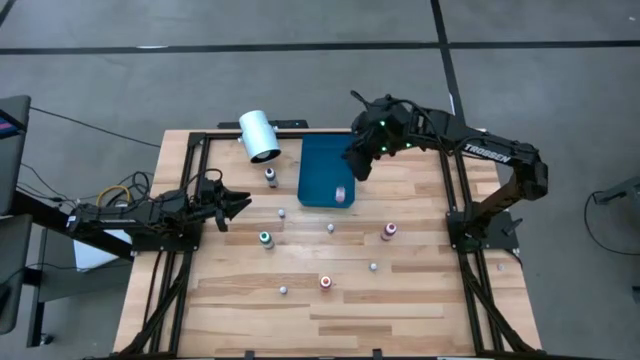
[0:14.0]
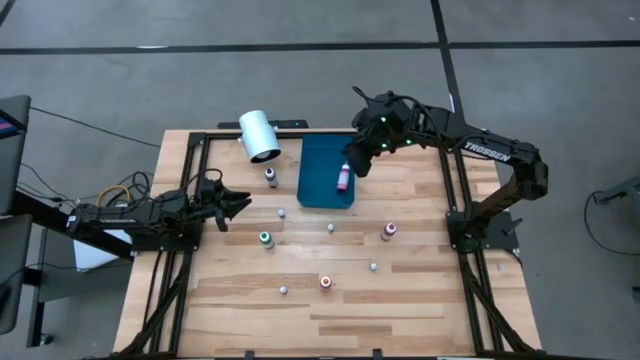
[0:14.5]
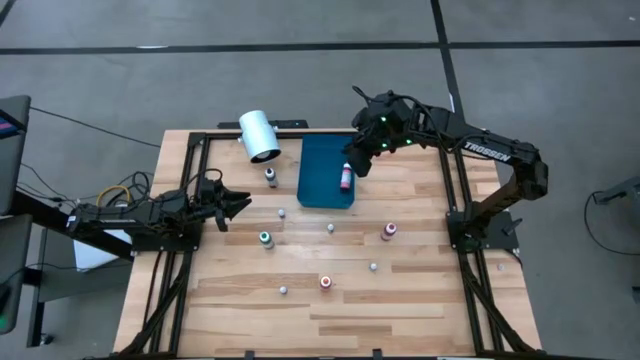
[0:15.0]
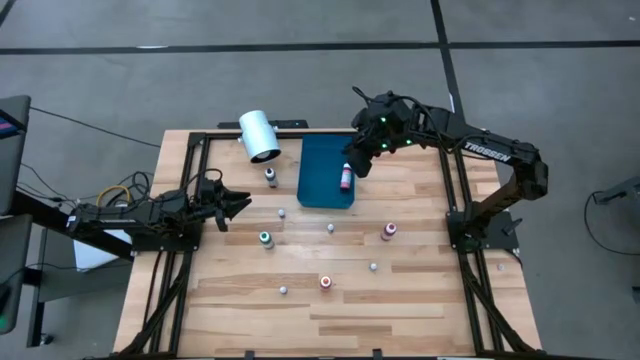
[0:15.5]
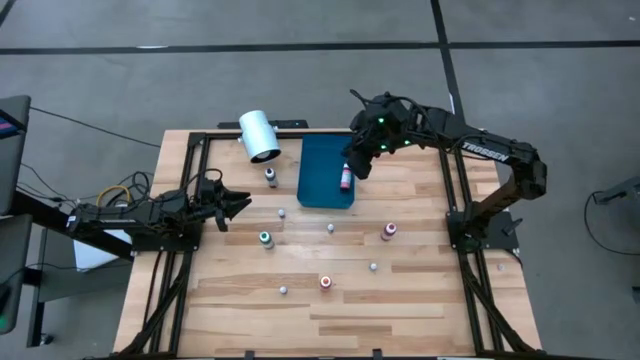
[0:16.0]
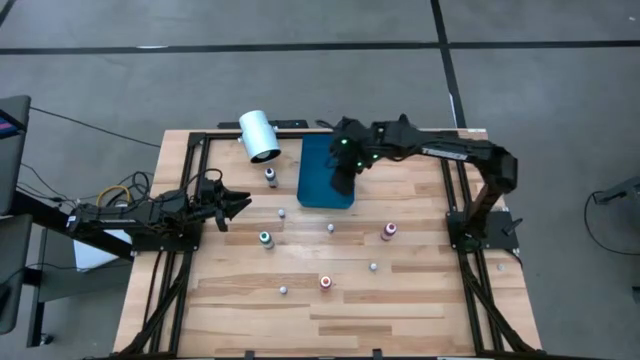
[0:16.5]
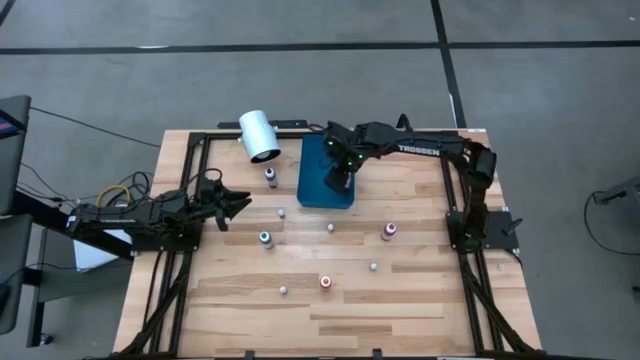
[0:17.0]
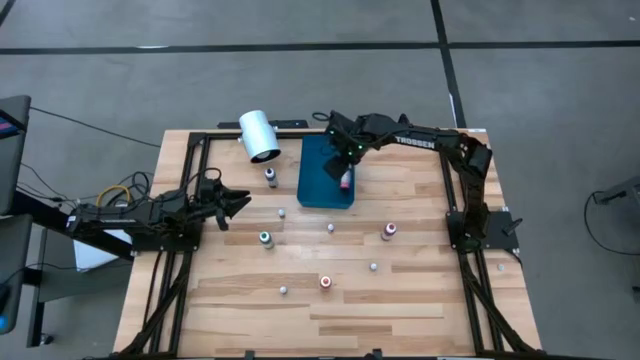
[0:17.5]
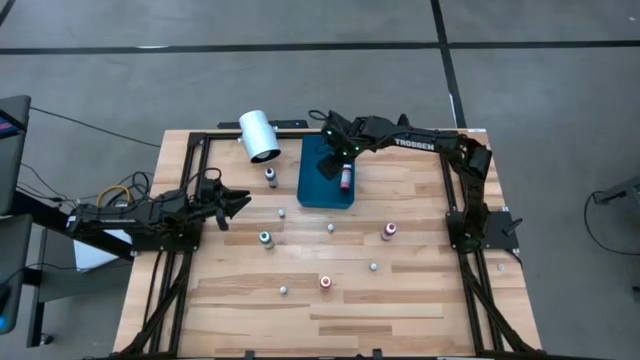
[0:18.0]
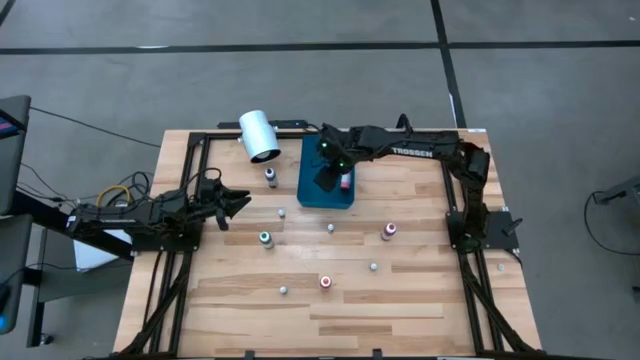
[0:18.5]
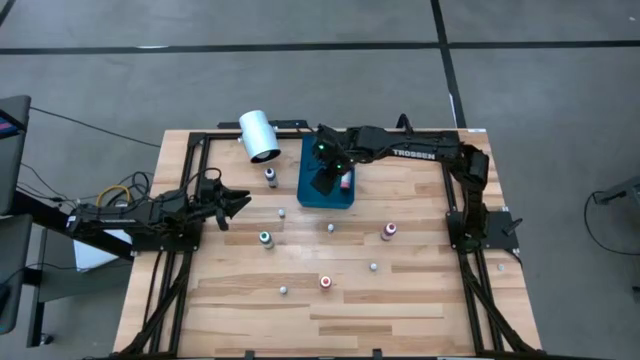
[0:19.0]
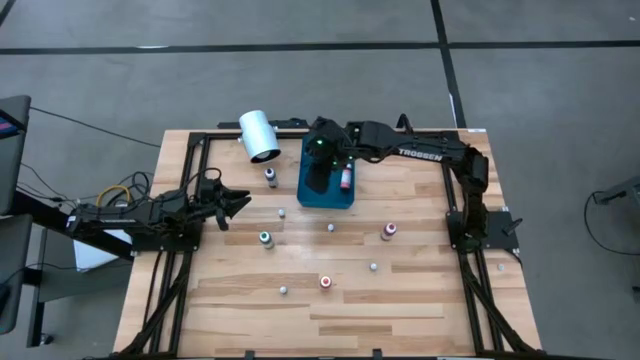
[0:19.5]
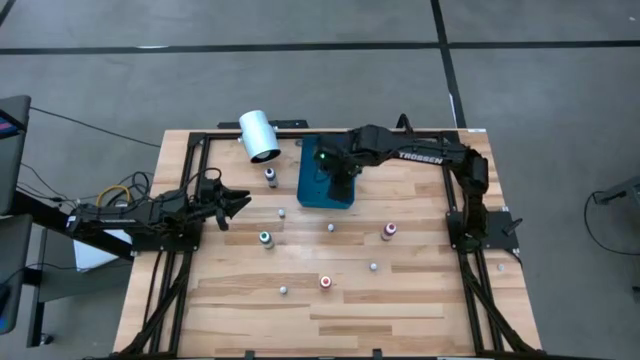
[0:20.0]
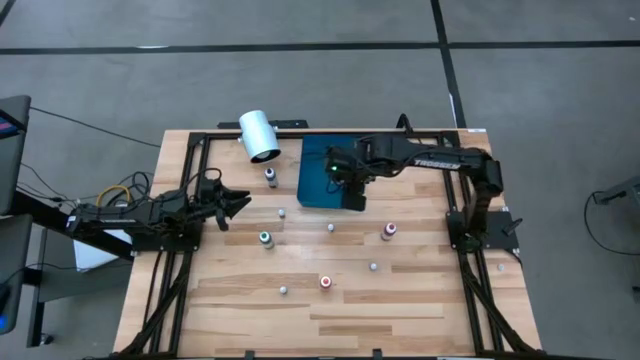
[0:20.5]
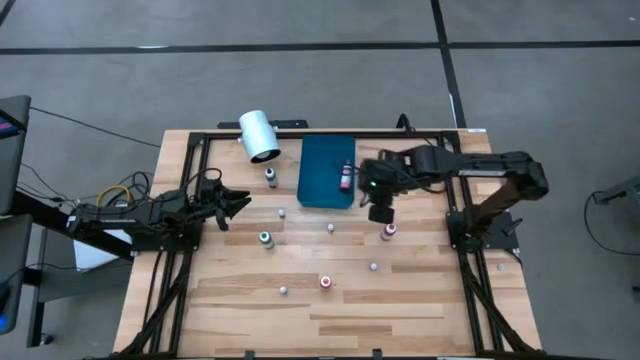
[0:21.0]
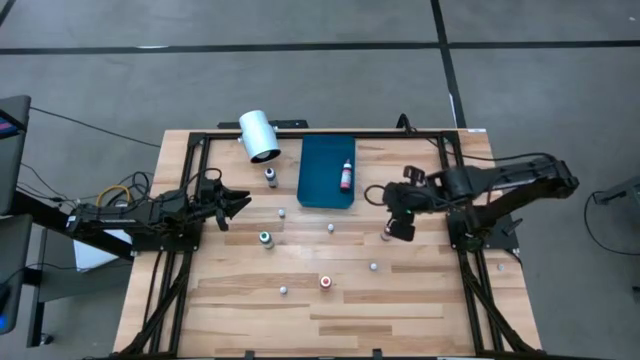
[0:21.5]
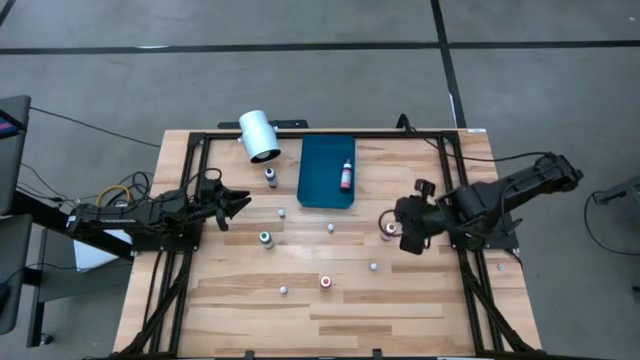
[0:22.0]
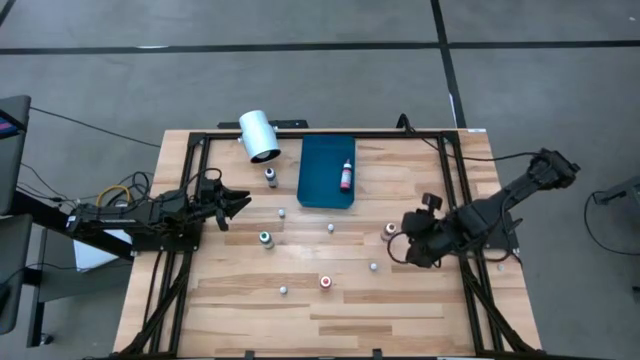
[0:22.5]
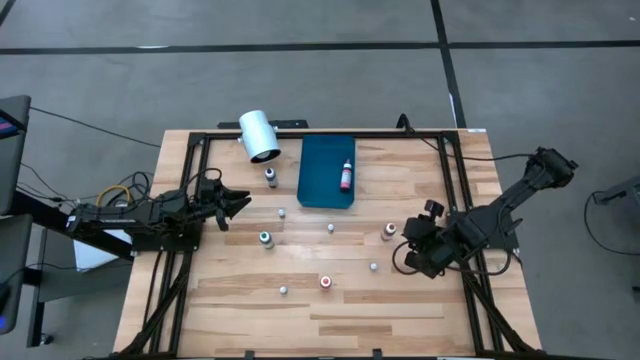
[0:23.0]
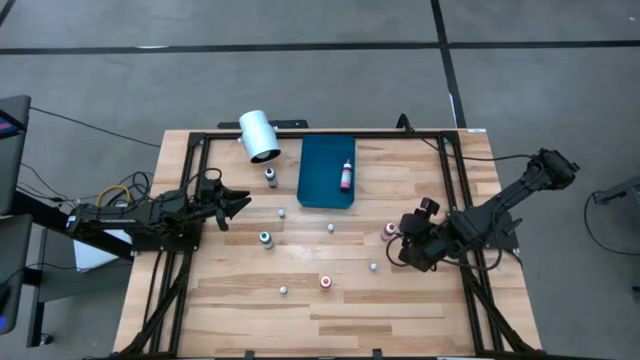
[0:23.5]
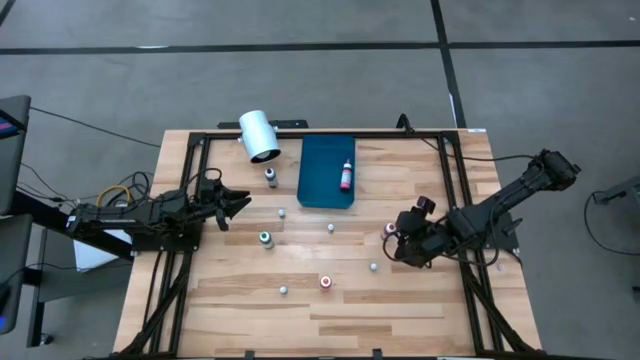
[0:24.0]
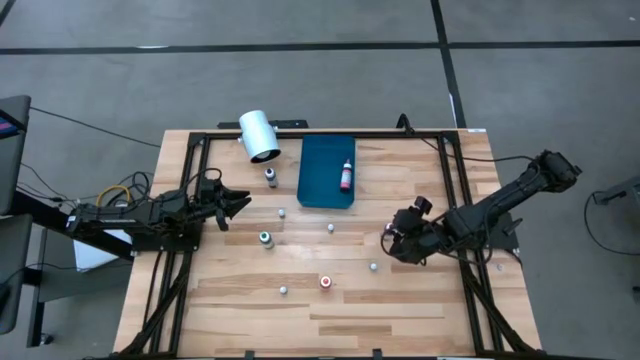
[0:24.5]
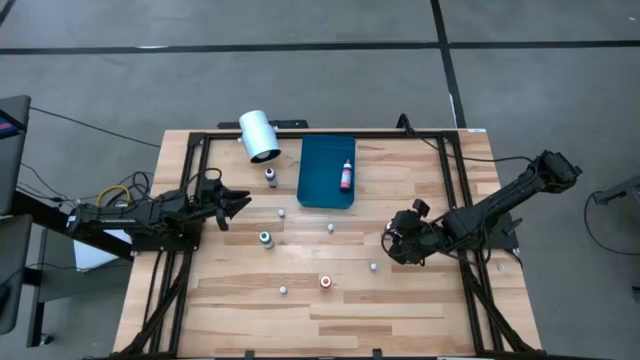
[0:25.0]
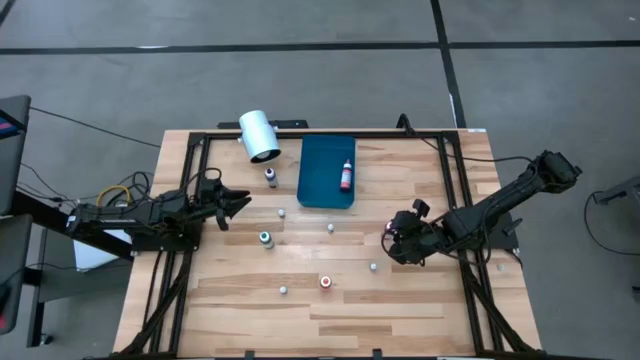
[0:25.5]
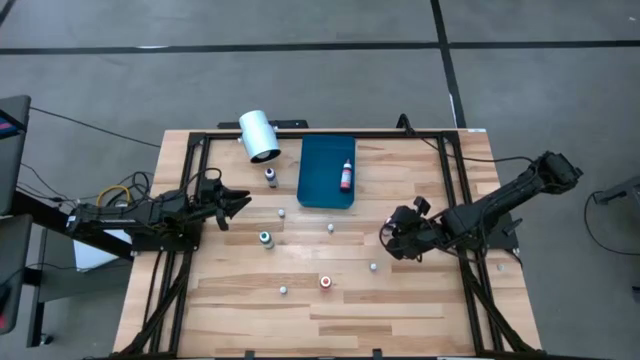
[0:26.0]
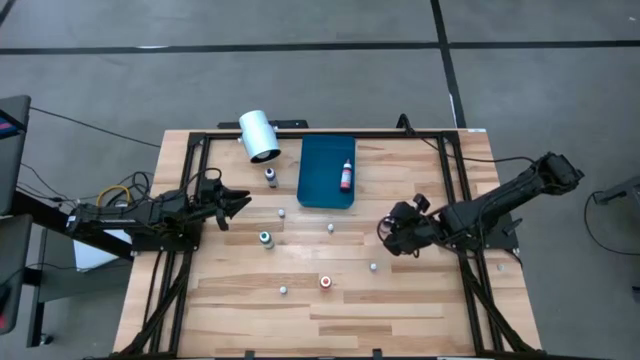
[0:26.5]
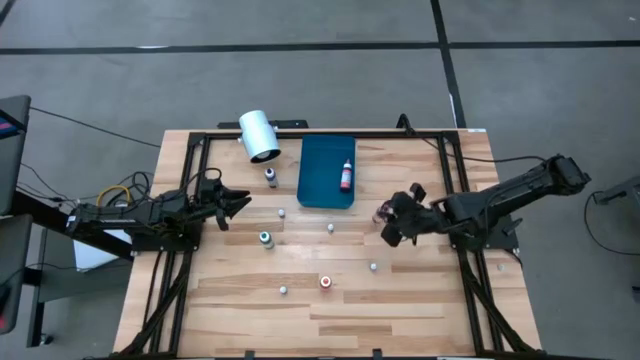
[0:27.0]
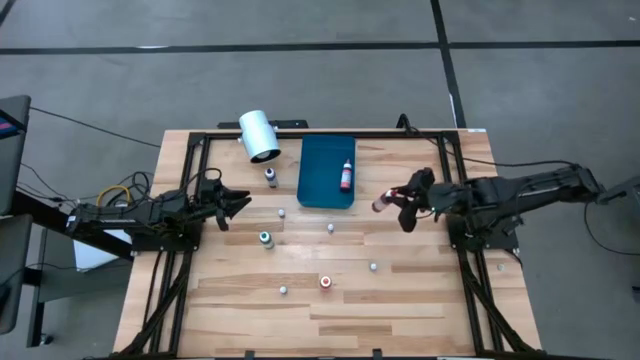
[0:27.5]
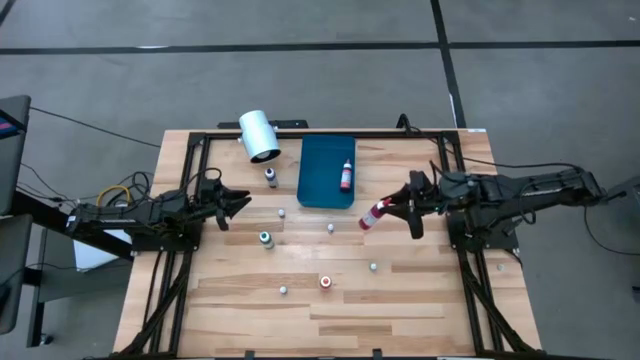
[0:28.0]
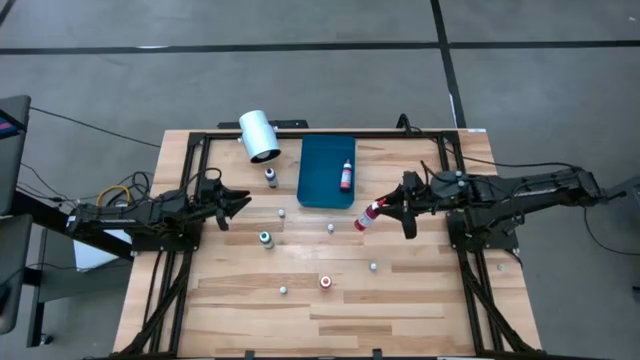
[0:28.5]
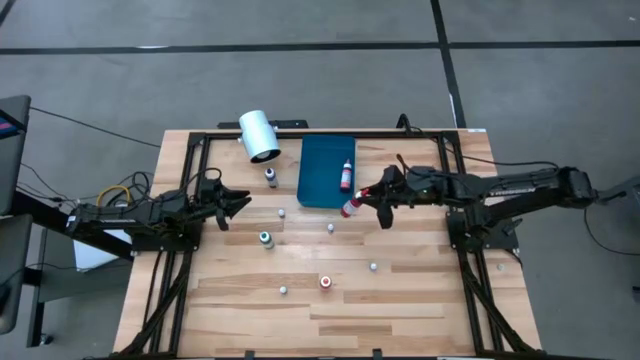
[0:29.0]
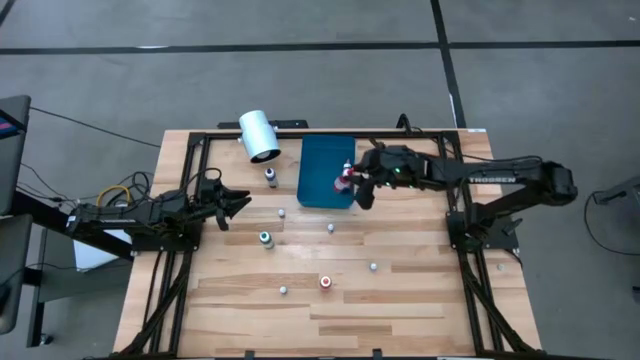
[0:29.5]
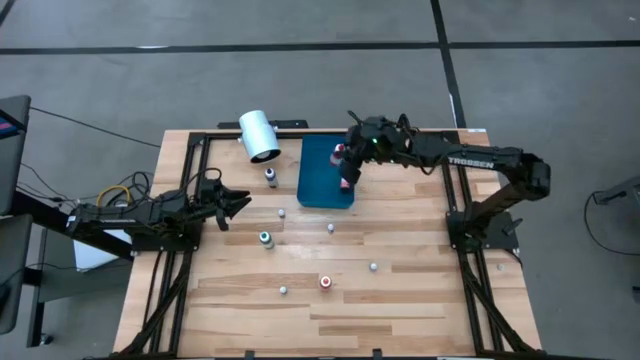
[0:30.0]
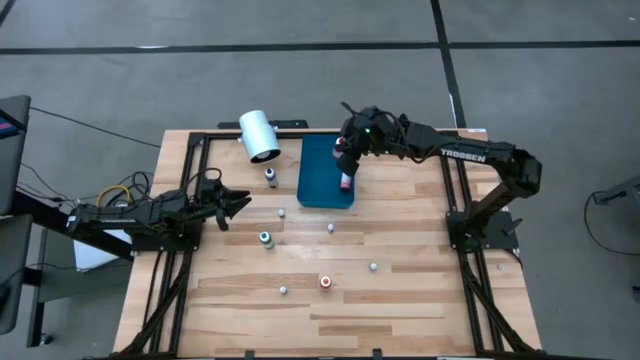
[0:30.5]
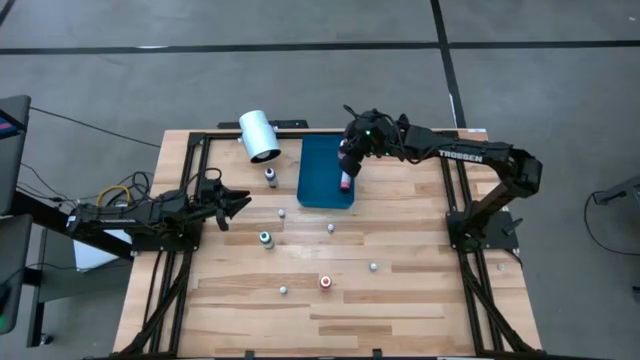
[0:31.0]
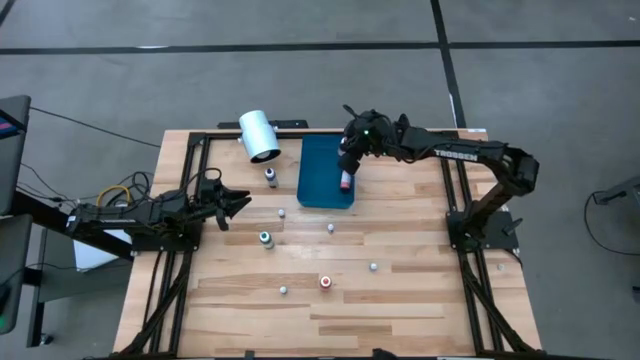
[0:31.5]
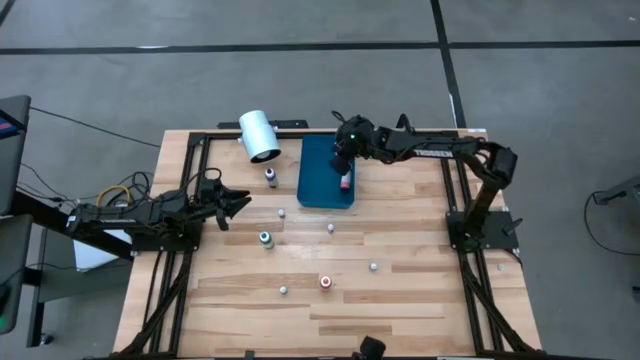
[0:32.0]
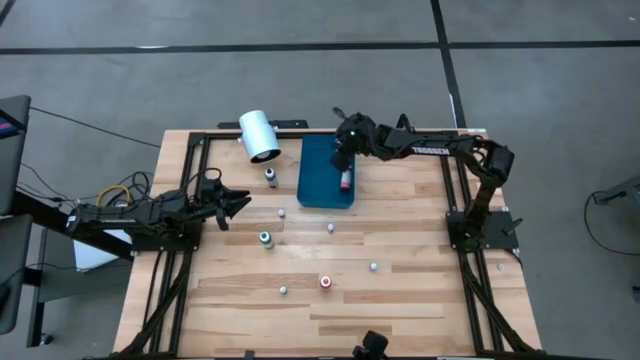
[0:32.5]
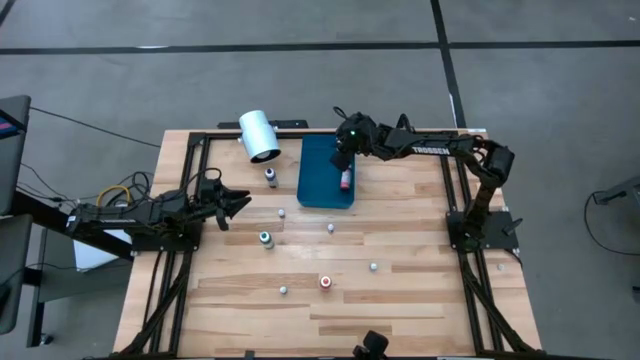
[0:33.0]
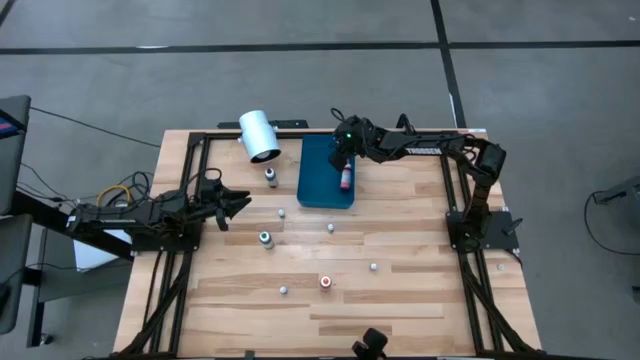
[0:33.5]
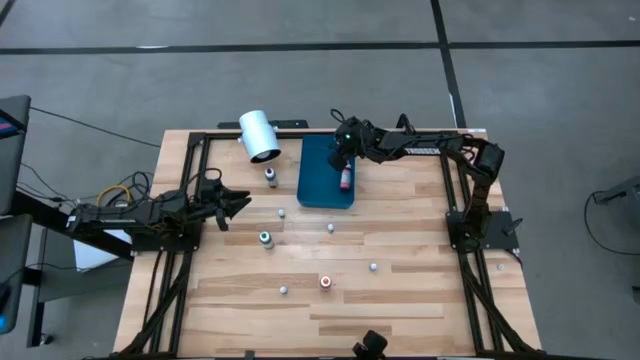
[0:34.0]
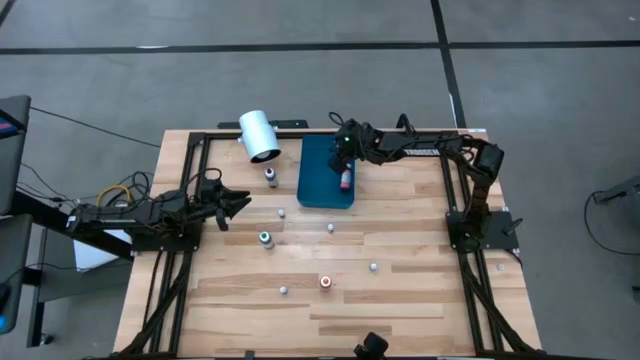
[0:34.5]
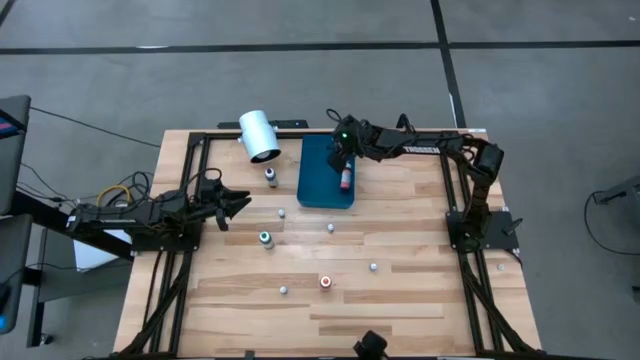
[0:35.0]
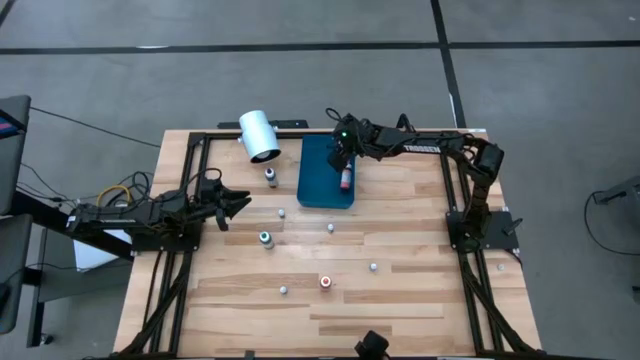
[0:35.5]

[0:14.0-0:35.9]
Task: Pick & Place food coloring
Put the large red food coloring bottle into the blue bin
